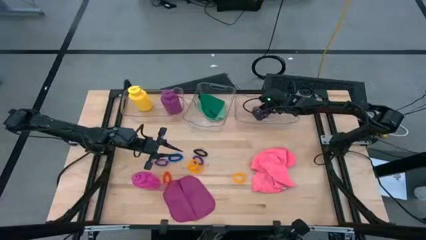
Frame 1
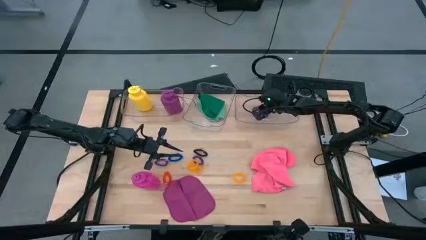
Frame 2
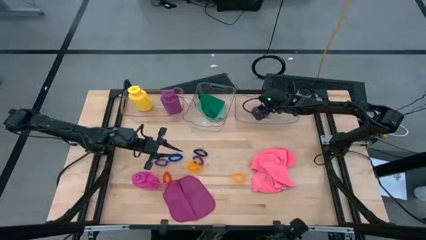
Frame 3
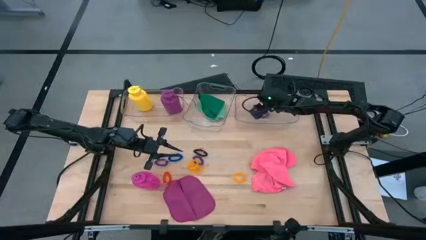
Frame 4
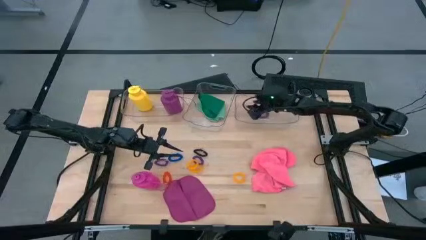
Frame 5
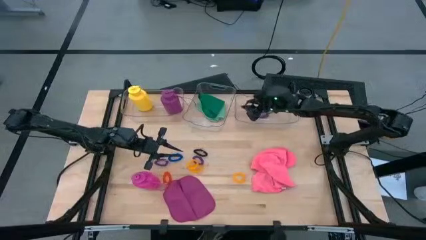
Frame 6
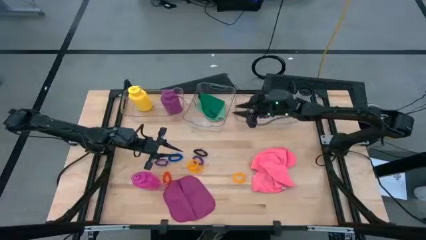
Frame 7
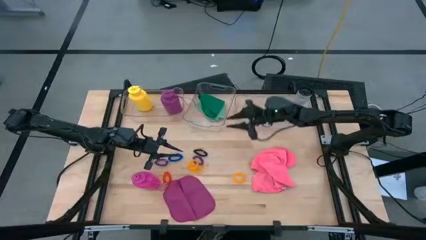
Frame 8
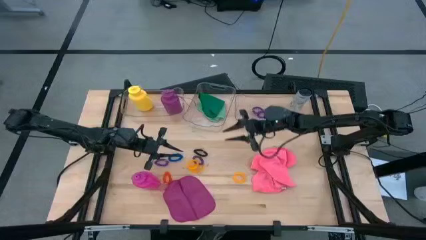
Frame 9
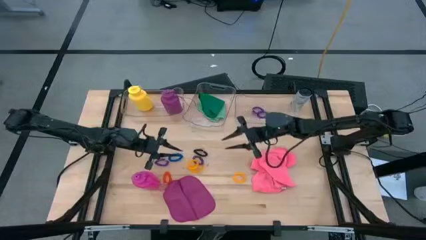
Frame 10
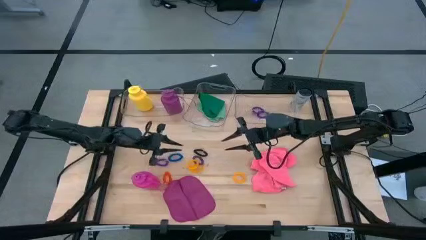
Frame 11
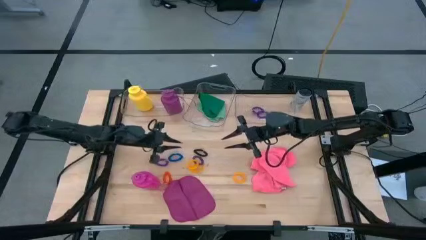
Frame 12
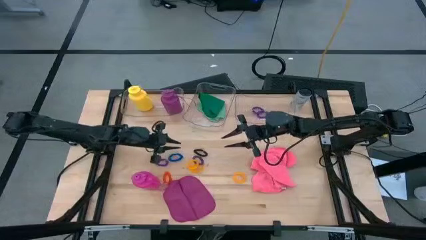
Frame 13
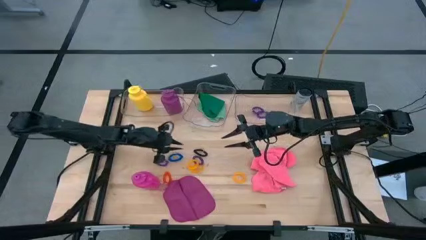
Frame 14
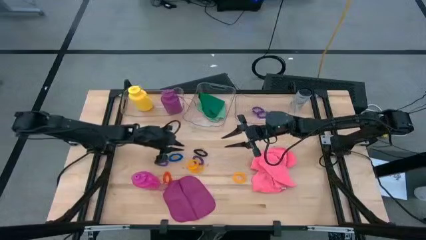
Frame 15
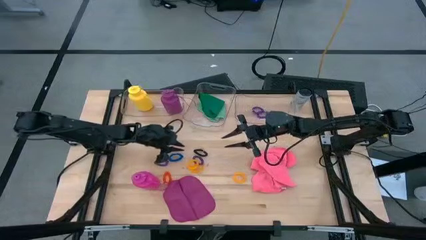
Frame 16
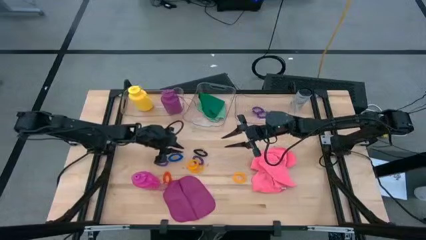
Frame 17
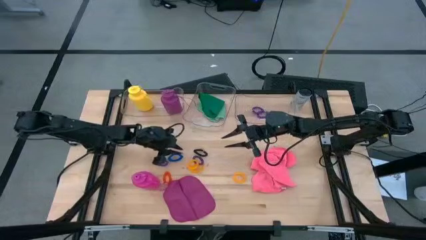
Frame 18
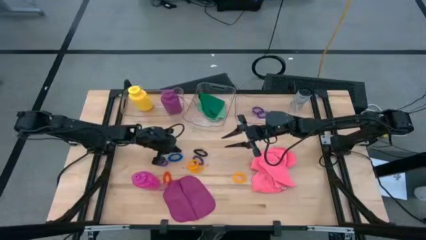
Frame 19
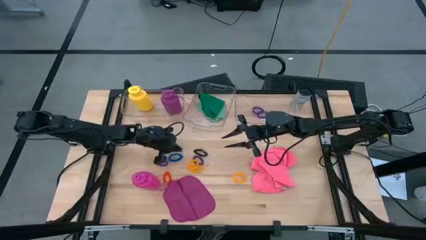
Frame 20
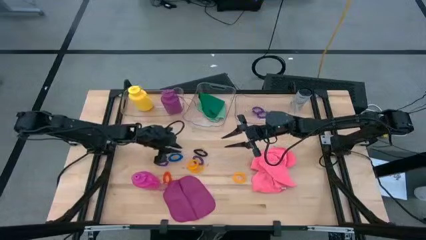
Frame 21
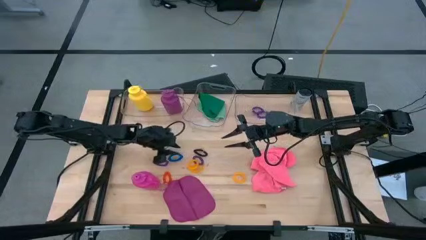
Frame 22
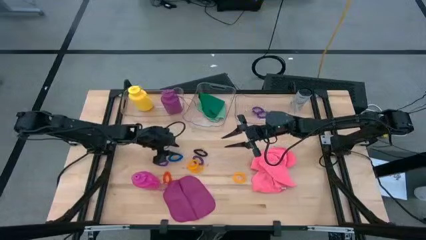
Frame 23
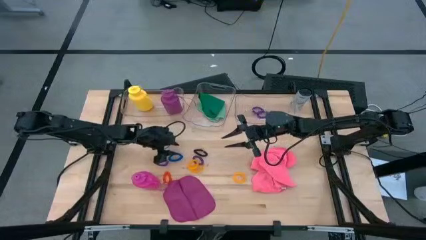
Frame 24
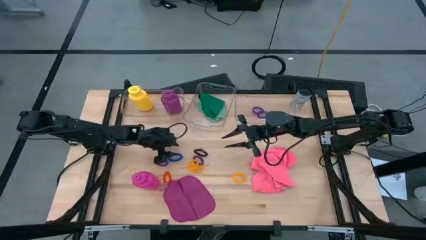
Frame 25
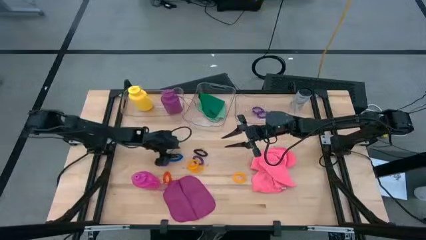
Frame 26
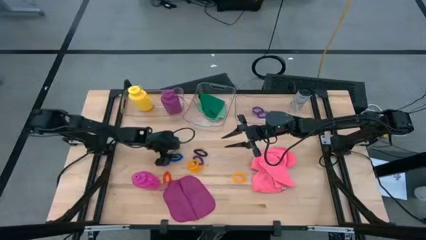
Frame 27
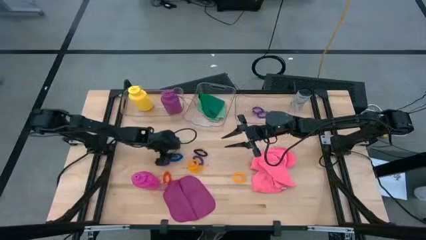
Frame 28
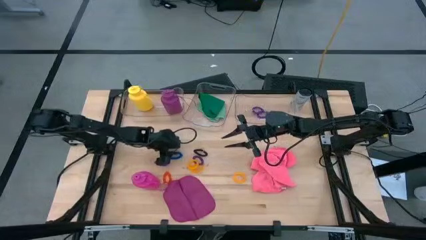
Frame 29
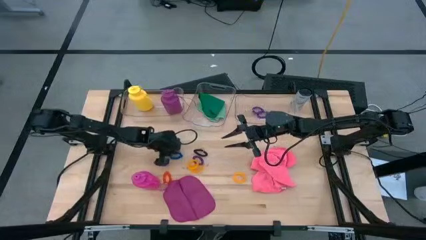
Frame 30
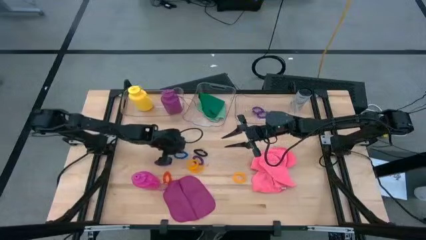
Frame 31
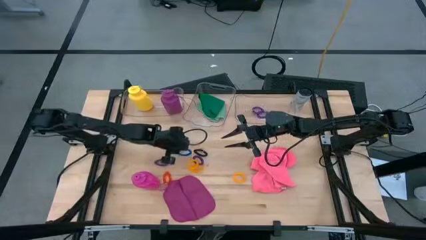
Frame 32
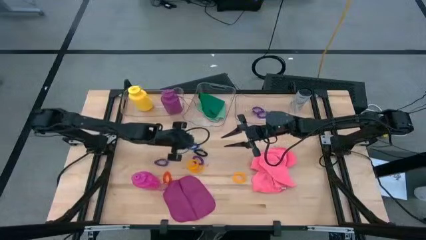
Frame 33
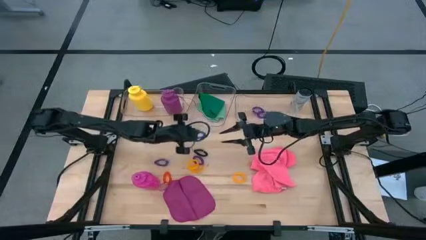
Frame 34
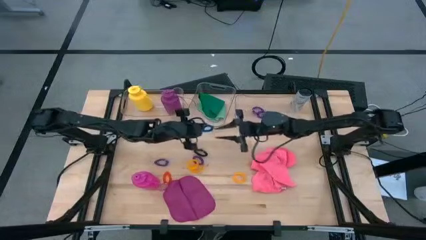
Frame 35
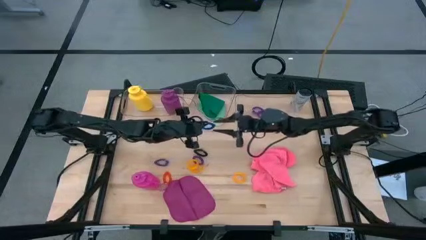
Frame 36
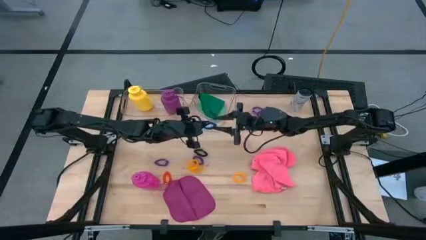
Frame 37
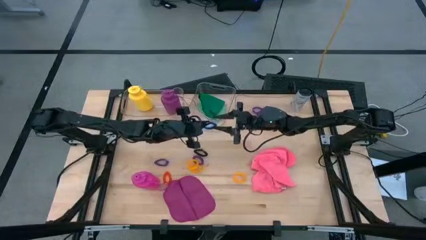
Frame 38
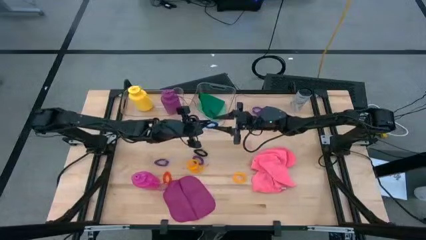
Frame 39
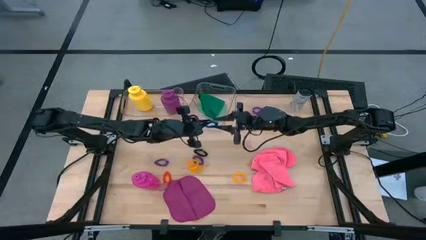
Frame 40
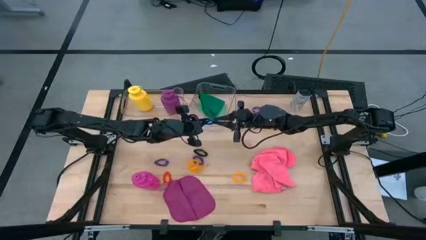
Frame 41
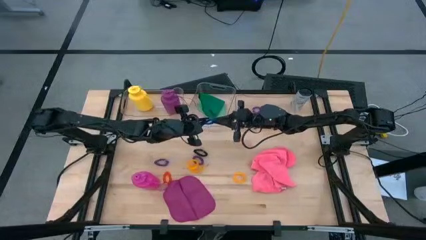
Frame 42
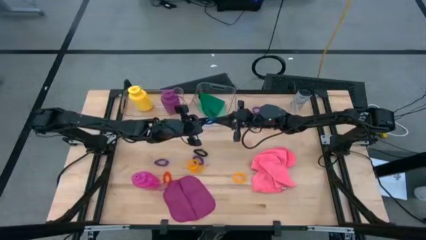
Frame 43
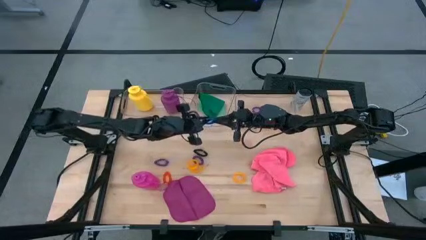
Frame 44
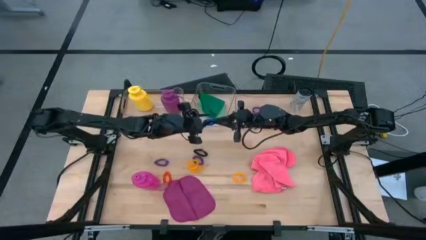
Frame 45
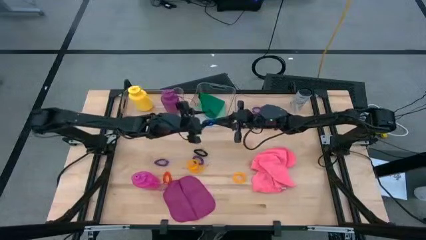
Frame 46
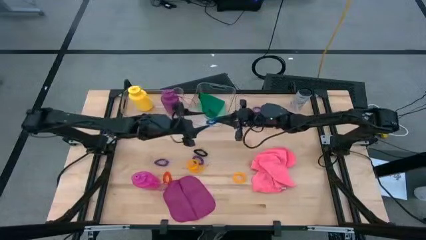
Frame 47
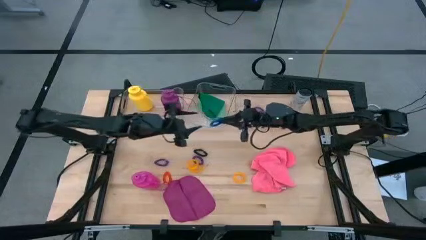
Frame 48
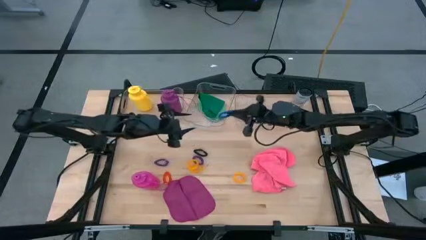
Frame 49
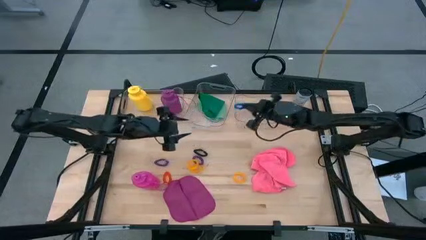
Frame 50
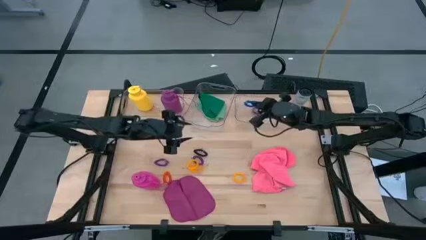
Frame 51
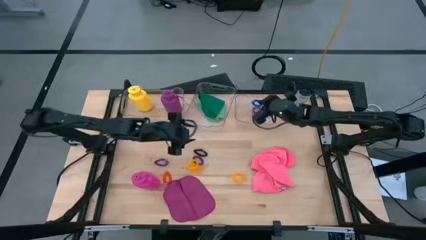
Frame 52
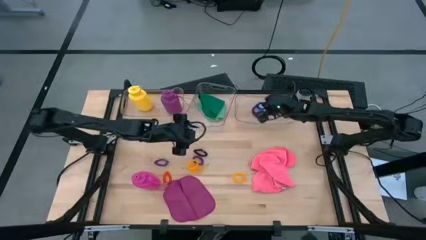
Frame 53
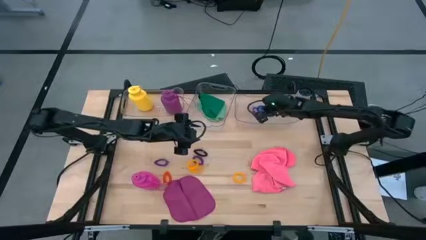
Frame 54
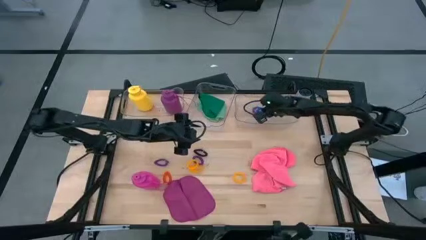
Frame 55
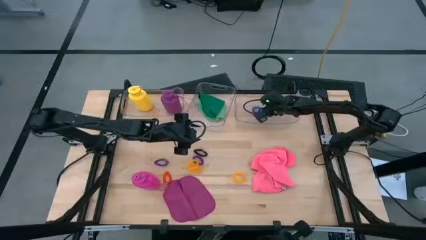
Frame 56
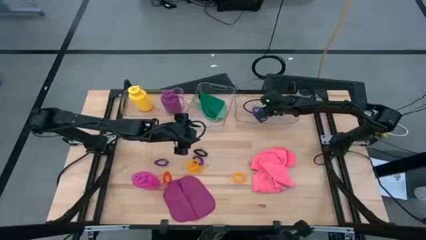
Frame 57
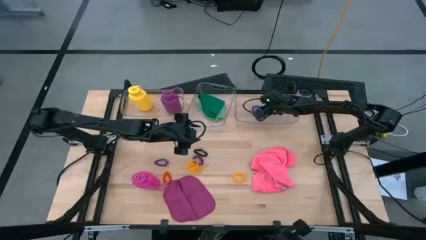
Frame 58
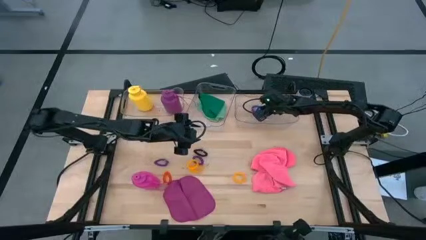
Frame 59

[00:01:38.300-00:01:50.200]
Task: Pick & Place Sports Items
Put the blue spring keychain into the right transparent bin

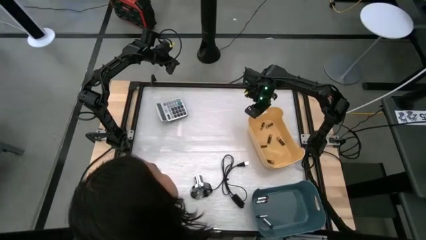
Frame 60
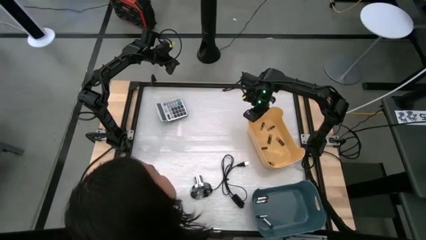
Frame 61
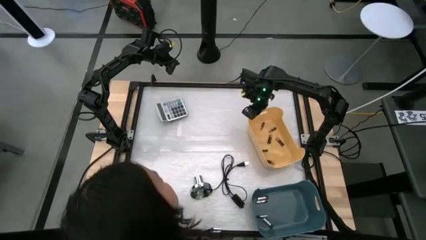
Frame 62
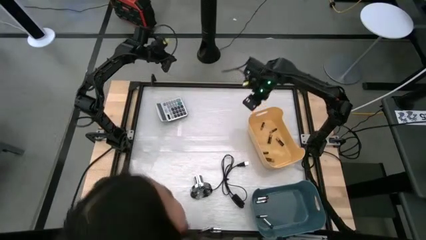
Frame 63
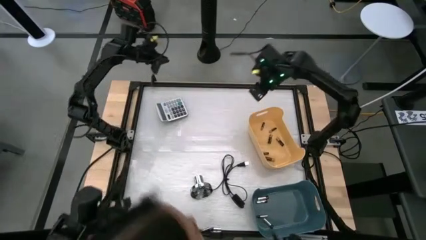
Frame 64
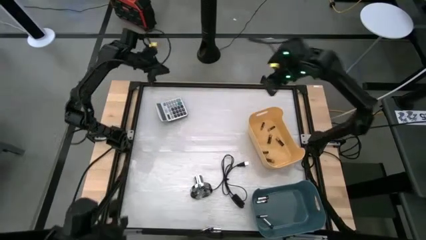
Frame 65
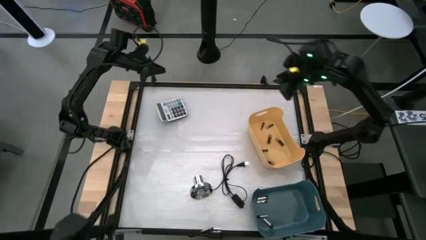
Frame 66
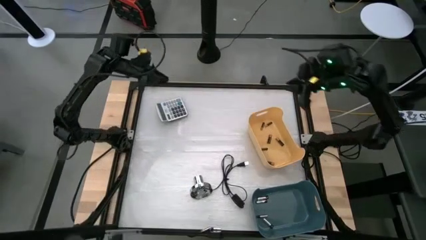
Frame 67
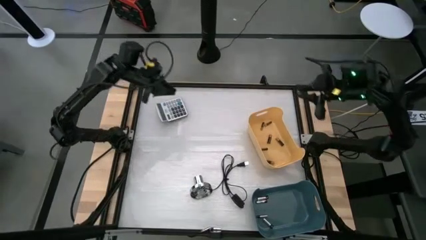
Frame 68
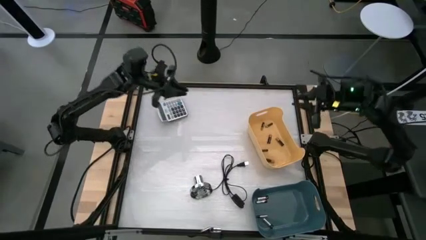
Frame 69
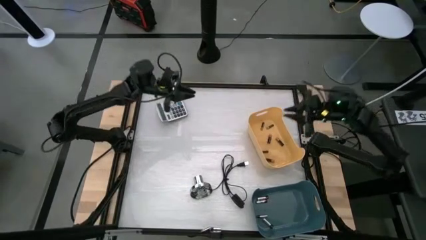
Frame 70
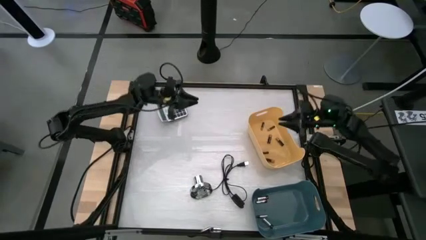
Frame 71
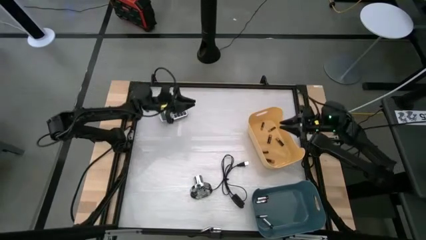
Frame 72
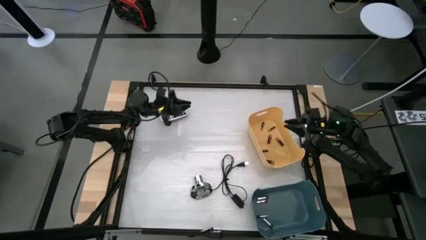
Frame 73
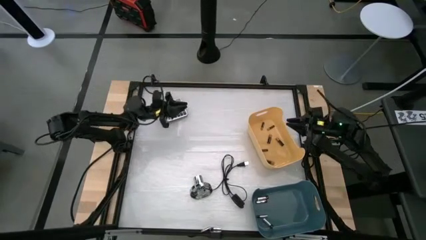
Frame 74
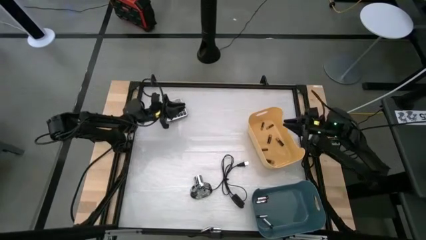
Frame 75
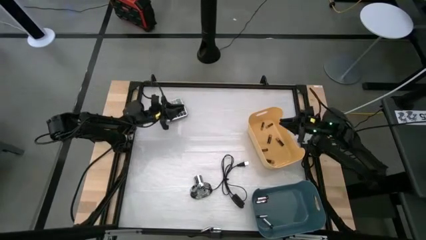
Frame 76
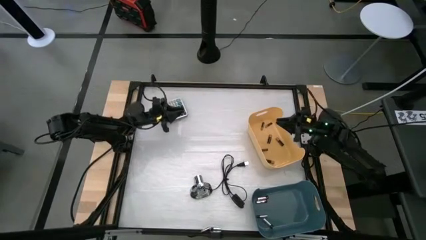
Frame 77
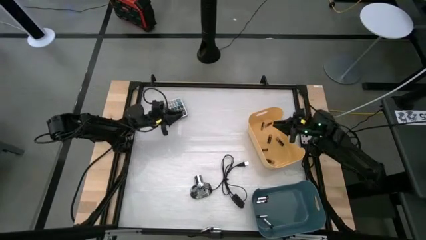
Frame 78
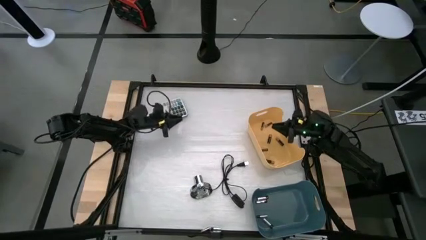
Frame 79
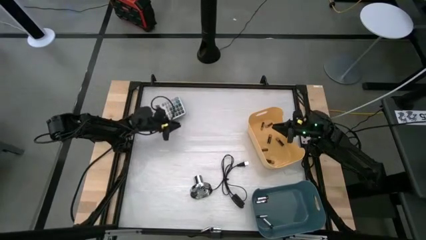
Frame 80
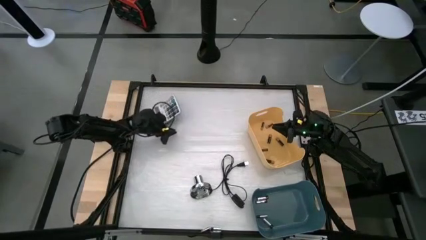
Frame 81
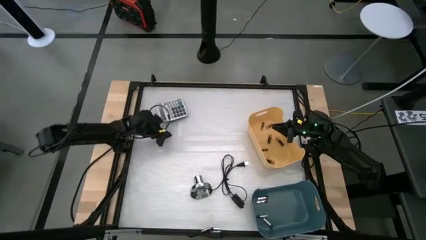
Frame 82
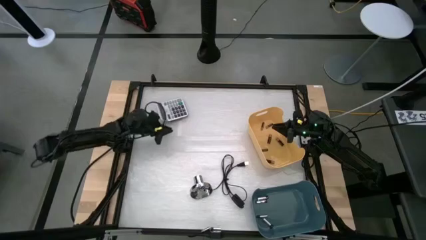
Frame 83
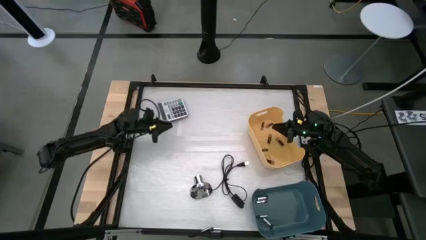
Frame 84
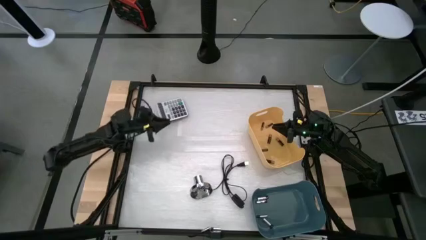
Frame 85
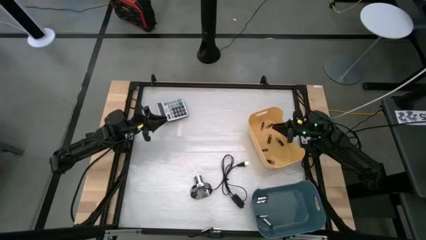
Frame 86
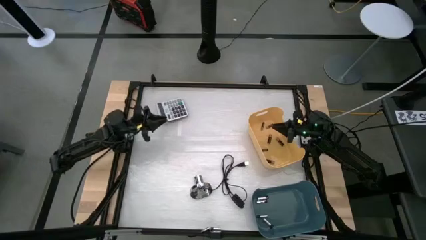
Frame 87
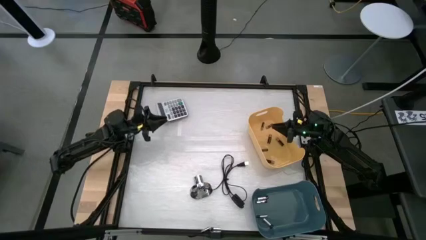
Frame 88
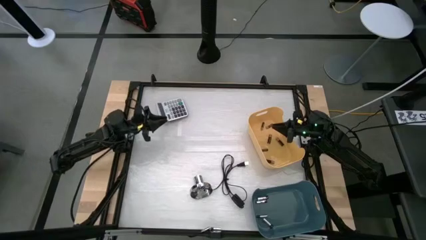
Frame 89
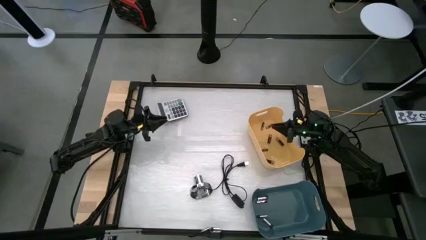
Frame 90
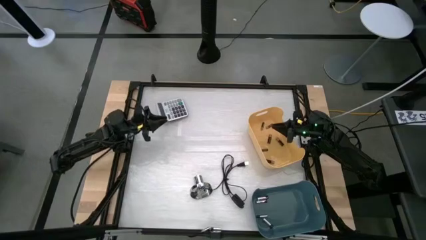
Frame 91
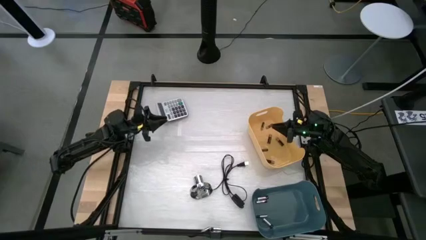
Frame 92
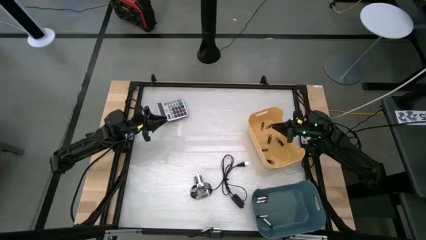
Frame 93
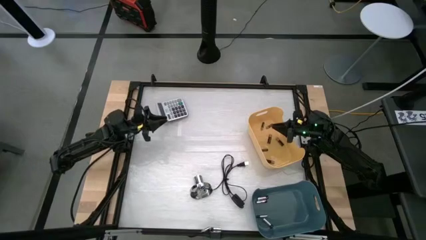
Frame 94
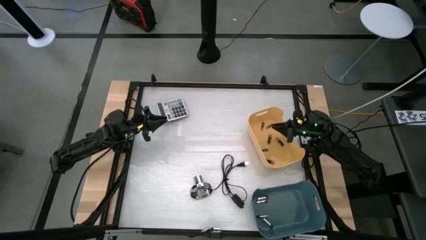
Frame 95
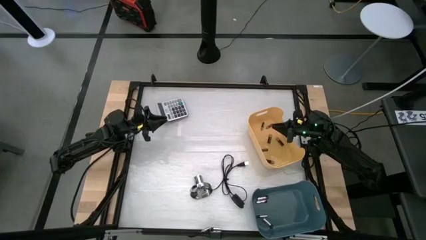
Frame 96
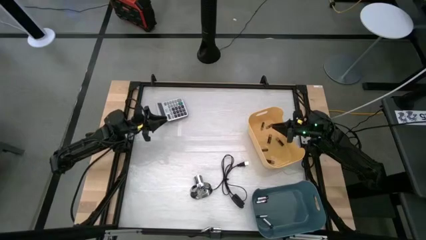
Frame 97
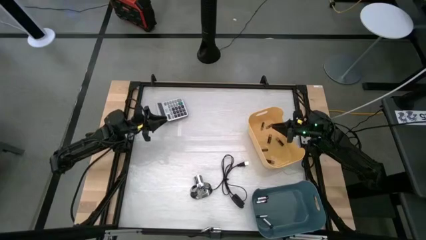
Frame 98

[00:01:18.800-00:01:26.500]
Task: Sort batteries
Return to Home Position
